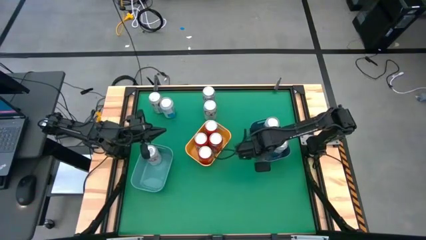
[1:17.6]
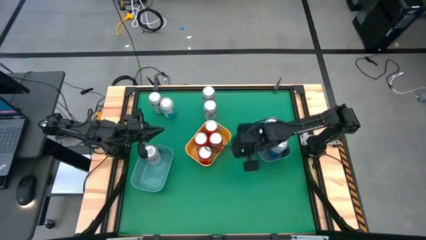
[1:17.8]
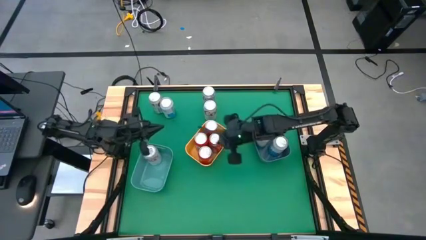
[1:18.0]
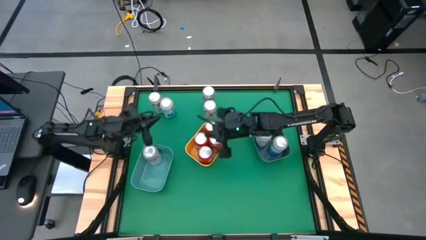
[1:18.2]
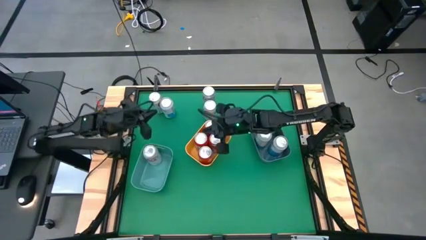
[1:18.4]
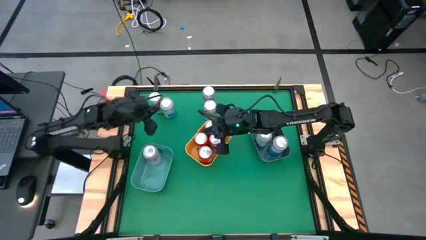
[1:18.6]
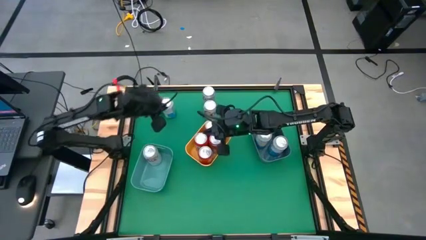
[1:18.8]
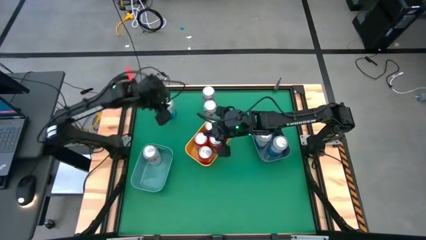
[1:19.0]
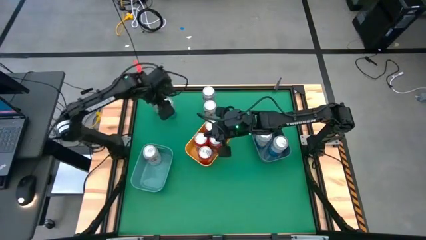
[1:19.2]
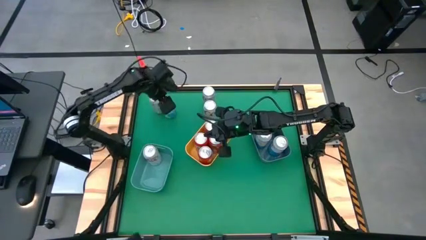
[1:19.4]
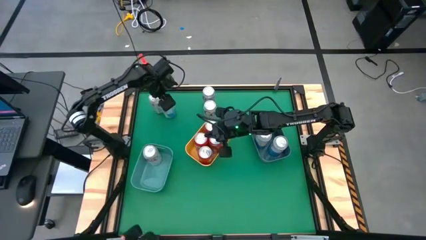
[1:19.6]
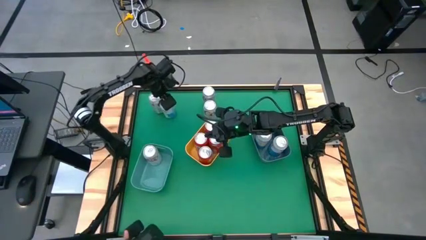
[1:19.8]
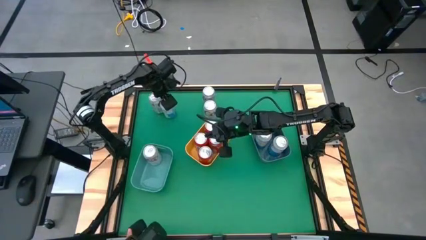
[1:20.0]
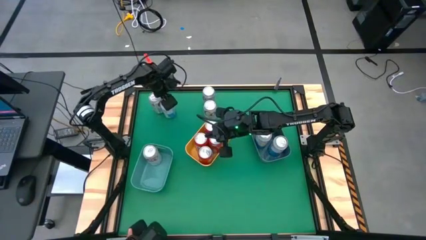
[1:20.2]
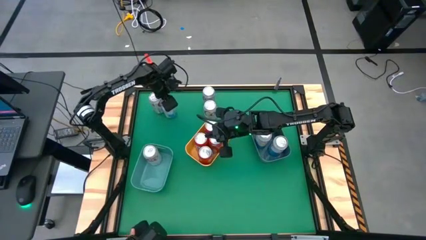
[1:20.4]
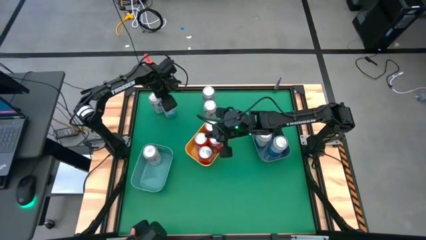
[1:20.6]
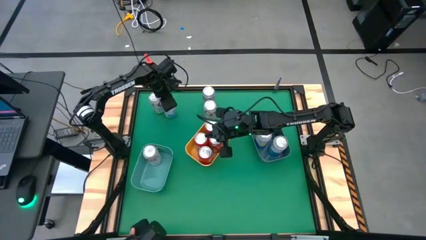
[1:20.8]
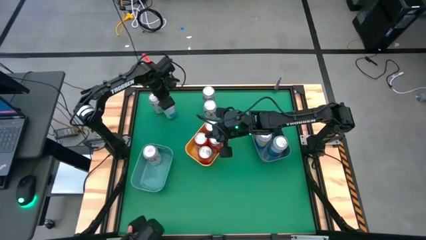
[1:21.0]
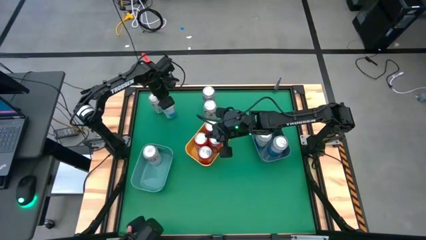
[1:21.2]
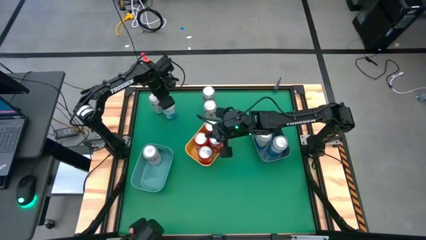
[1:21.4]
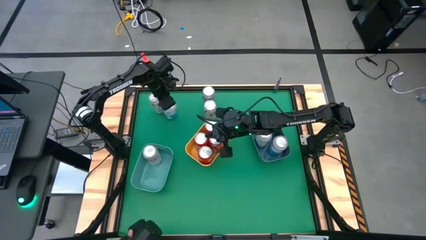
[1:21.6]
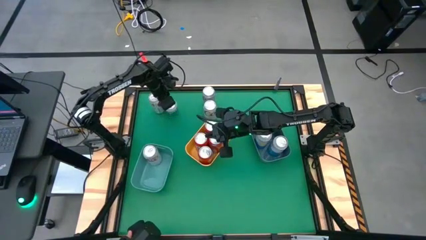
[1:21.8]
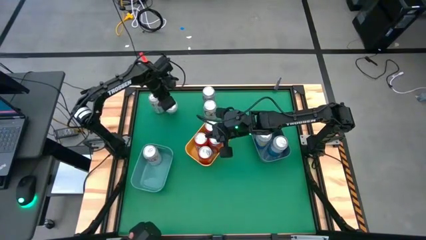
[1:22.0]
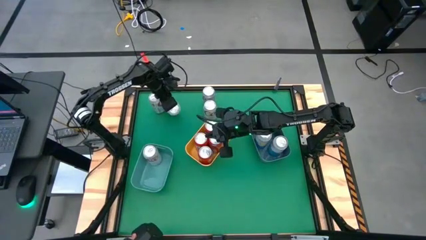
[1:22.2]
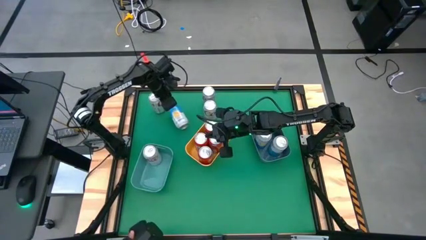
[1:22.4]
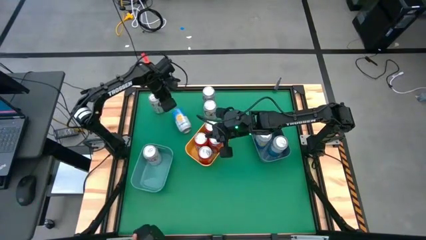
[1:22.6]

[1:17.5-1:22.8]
Task: Sort soda cans
Put the blue and white soda can into the blue bin

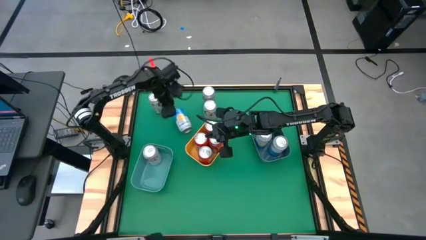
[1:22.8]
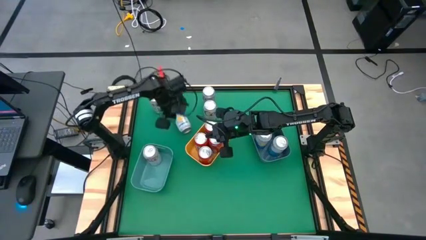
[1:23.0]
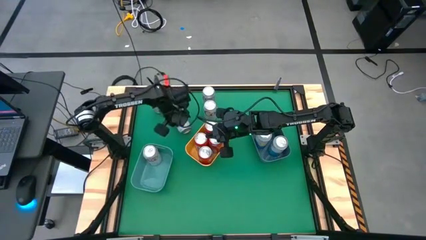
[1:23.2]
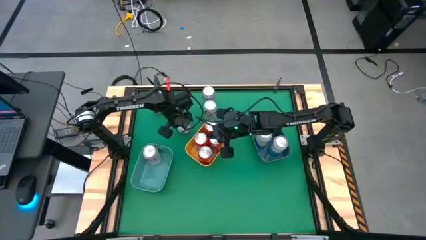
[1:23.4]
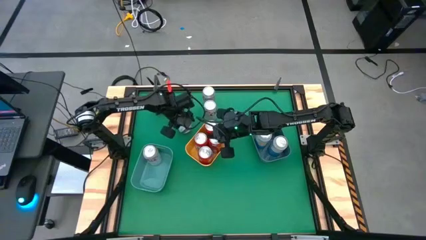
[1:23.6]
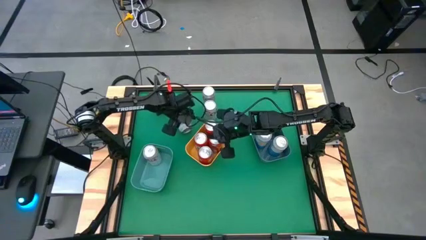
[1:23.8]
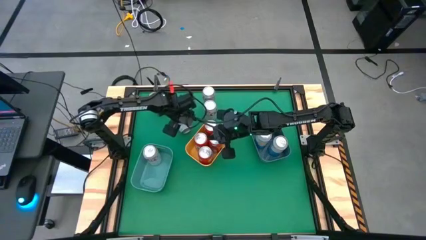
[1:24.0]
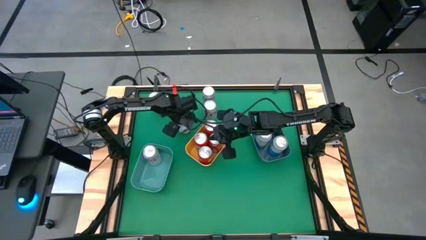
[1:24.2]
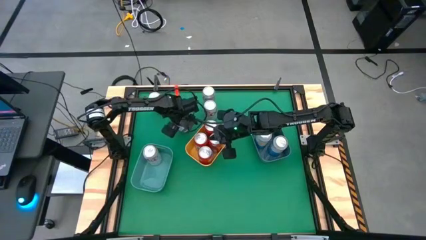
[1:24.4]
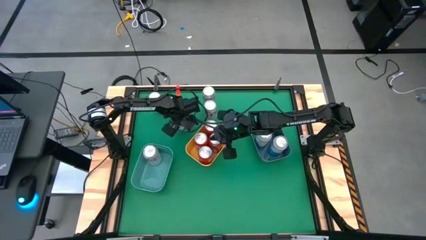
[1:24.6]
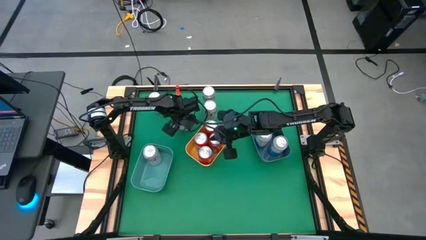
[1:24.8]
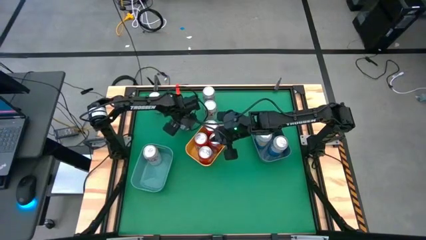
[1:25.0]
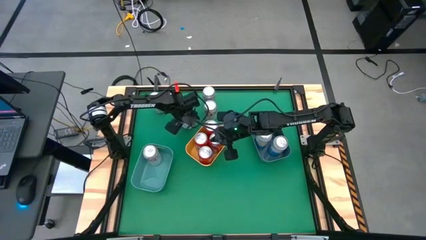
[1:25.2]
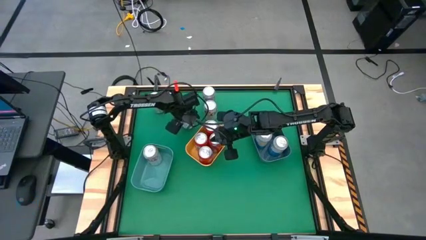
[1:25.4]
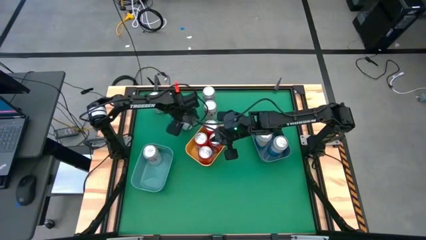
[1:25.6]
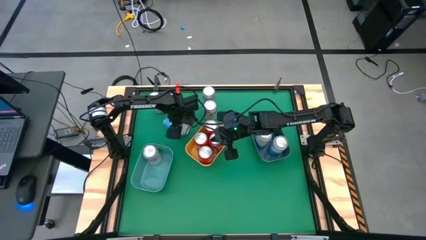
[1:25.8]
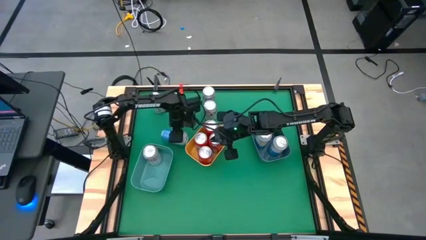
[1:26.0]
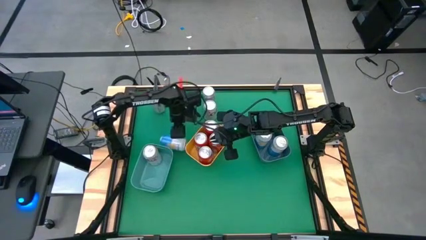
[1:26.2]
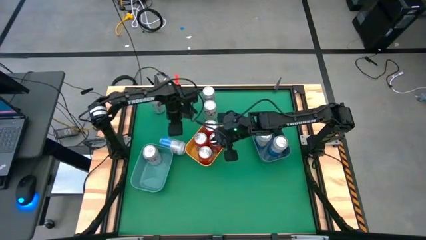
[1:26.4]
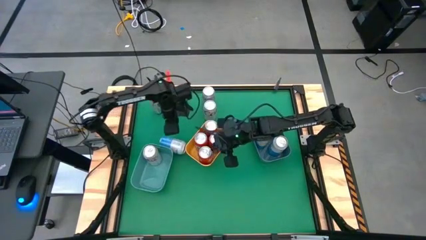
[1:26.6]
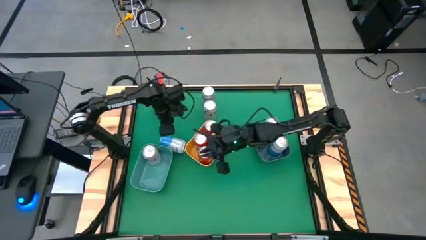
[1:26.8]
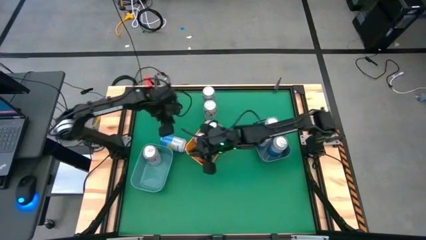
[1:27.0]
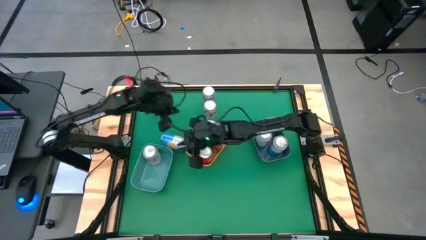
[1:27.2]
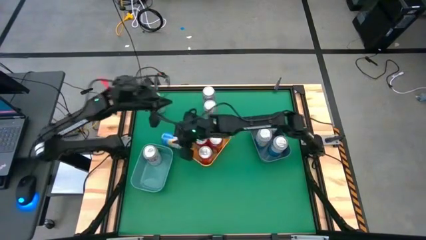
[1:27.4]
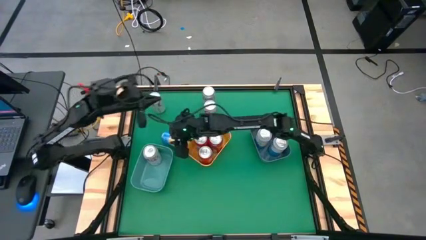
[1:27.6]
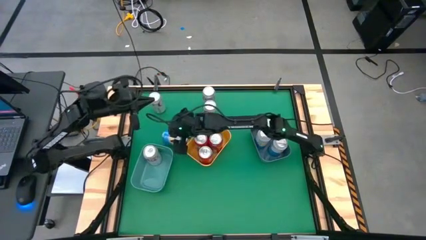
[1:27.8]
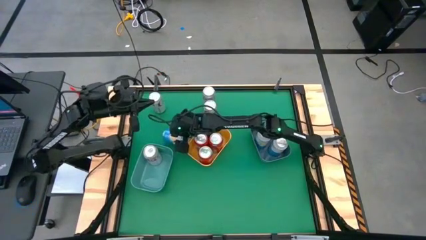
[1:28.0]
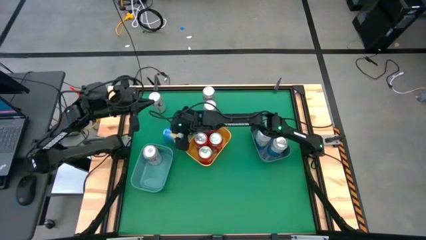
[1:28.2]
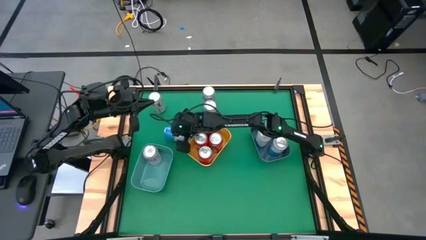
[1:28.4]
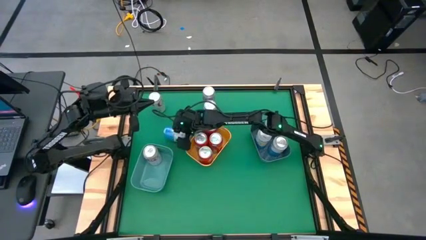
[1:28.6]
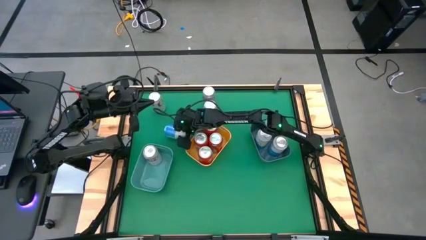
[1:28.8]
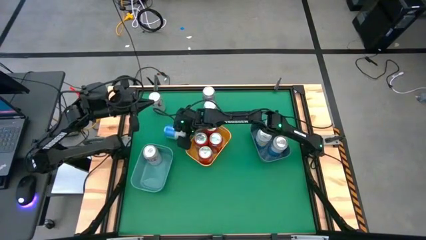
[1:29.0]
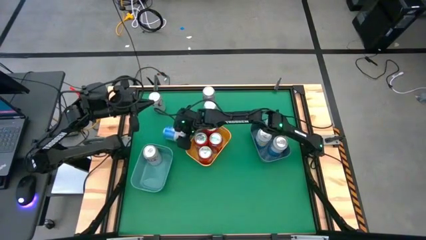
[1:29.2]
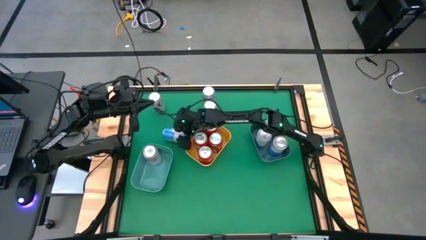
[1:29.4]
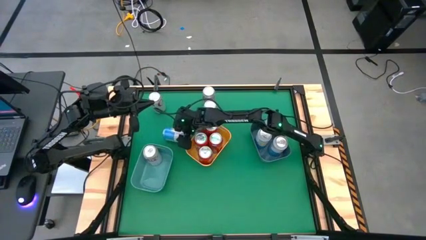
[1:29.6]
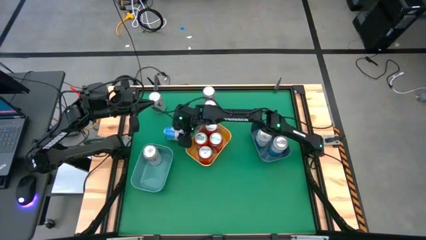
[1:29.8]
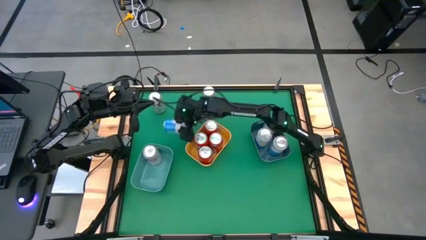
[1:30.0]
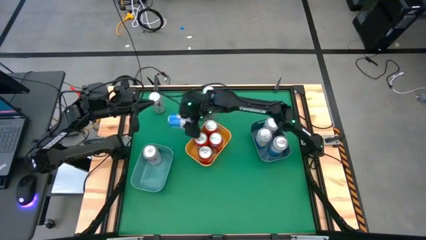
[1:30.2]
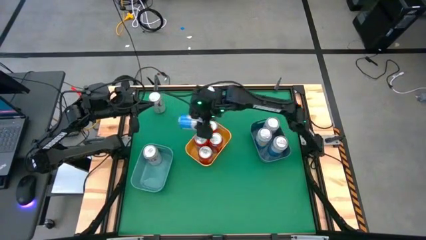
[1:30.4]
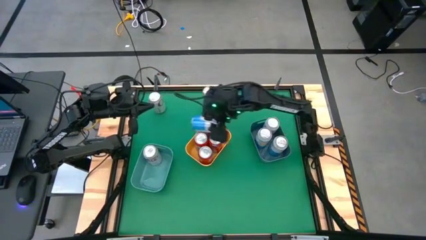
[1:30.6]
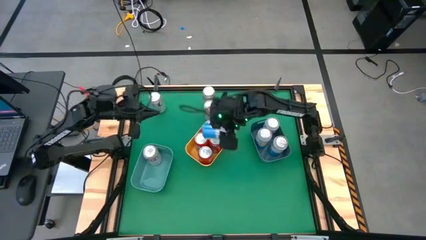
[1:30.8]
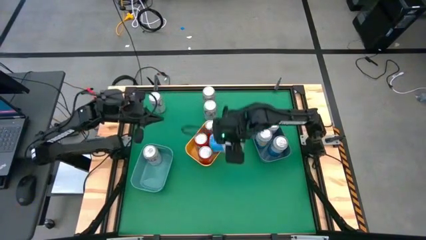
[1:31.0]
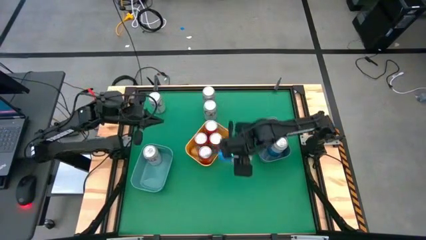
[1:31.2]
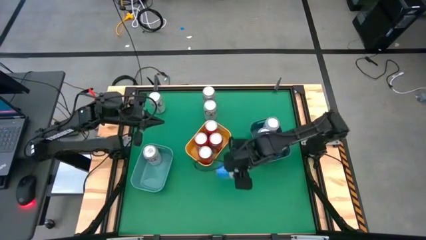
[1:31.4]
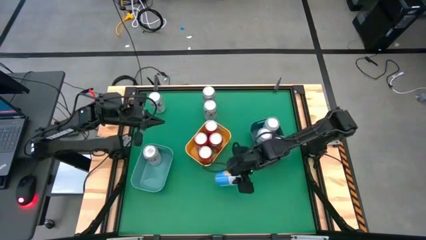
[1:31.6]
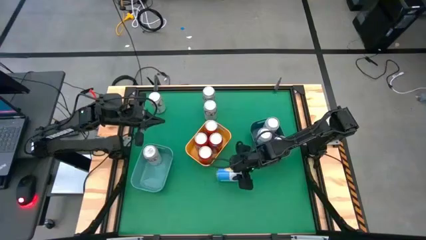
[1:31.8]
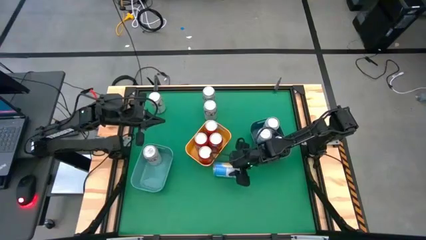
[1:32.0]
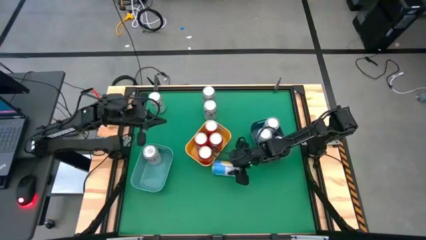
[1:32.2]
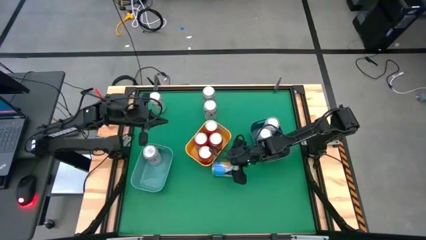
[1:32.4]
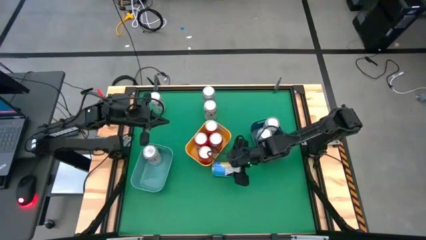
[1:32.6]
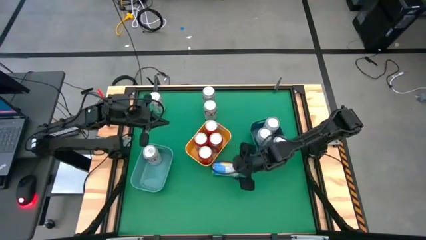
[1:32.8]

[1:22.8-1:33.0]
Put the blue and white soda can into the blue bin
